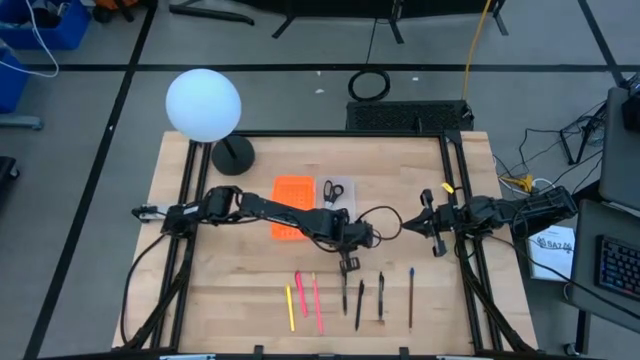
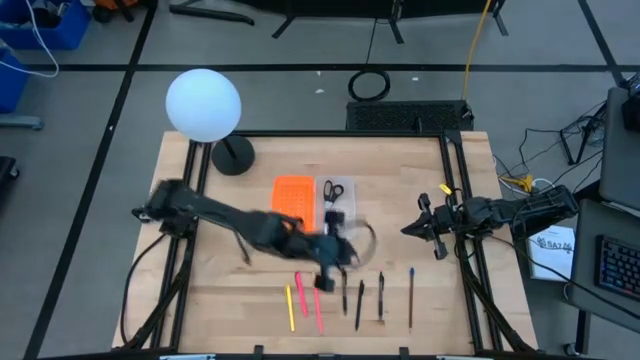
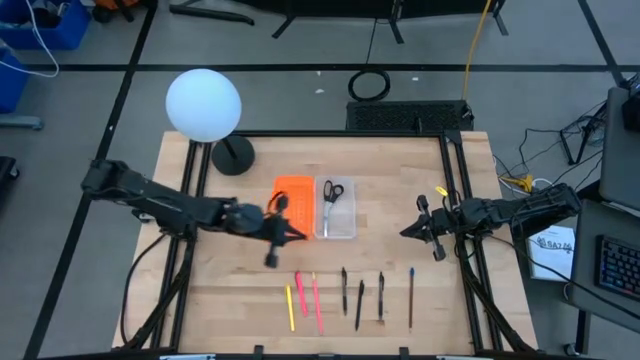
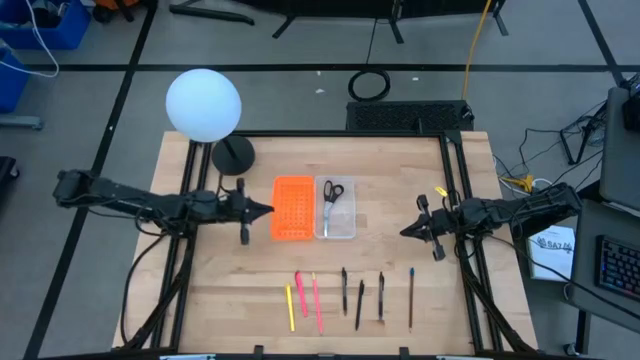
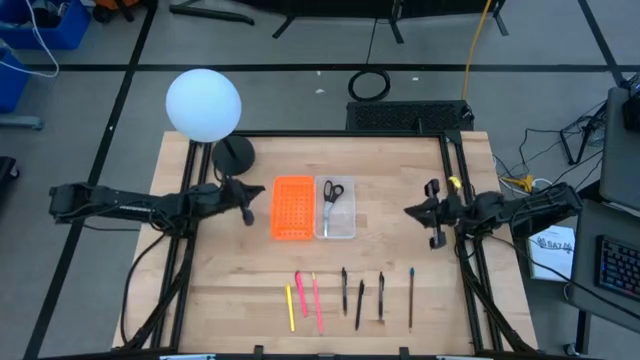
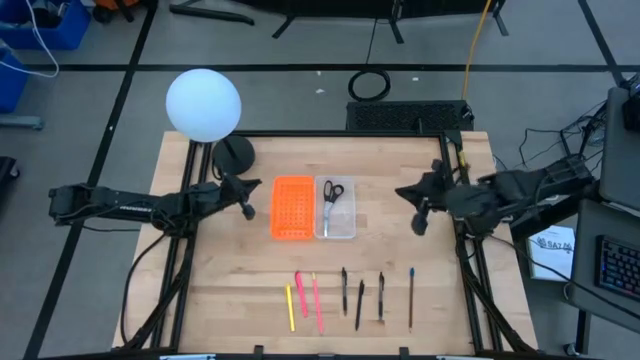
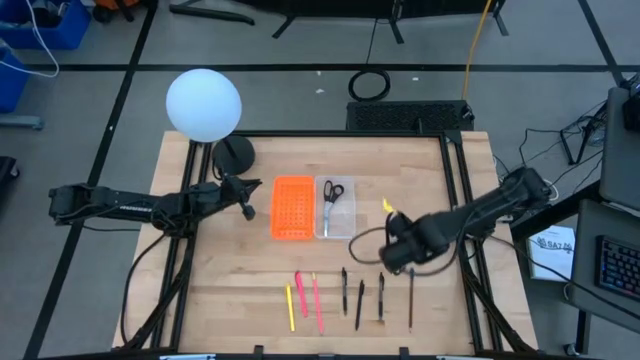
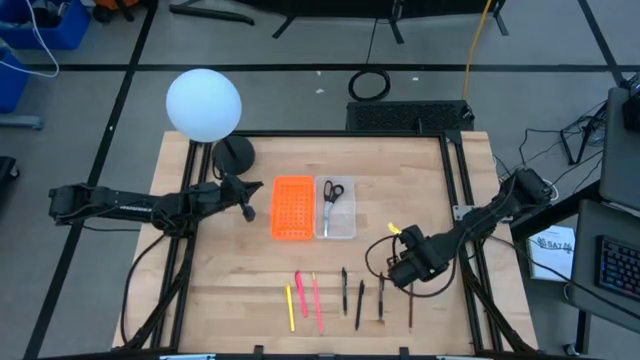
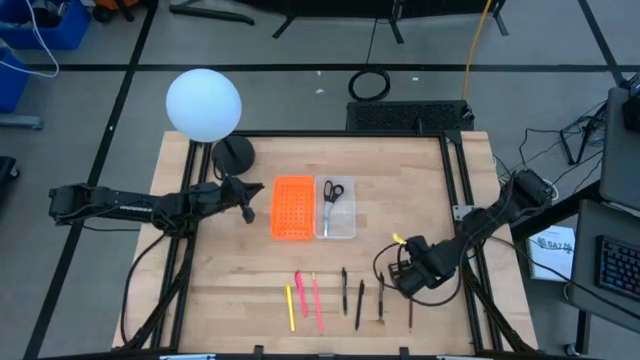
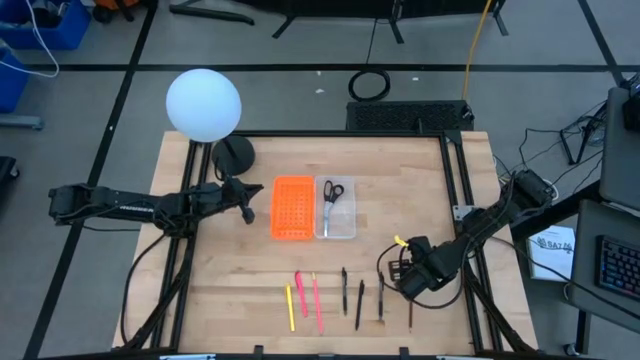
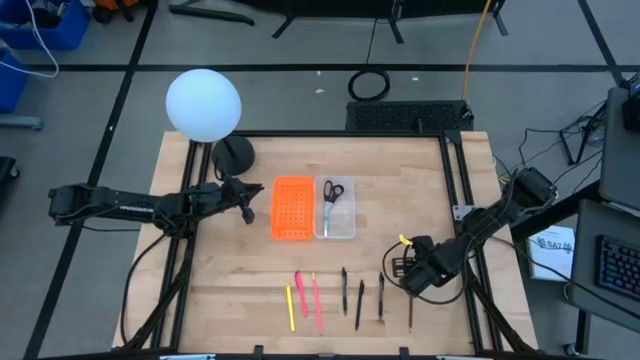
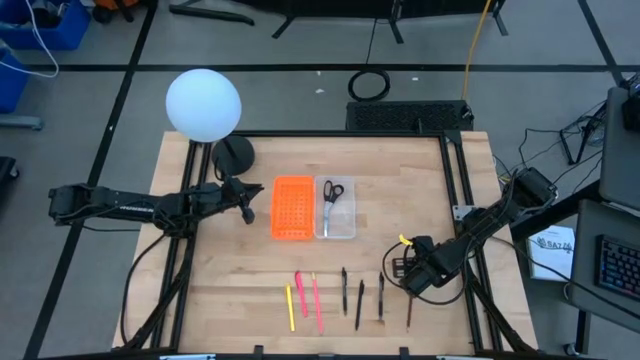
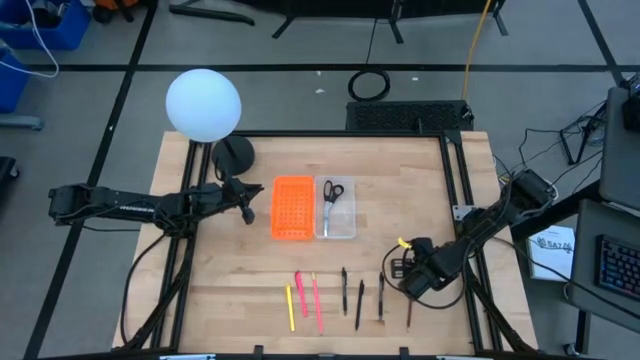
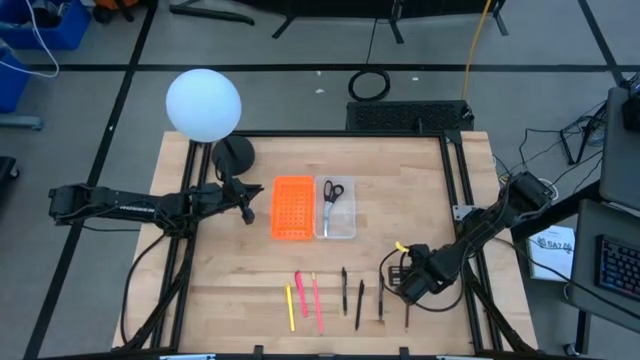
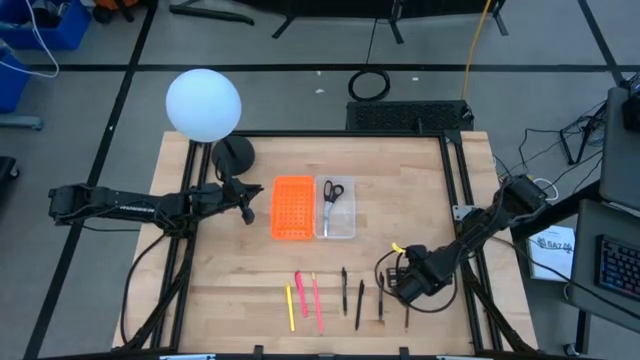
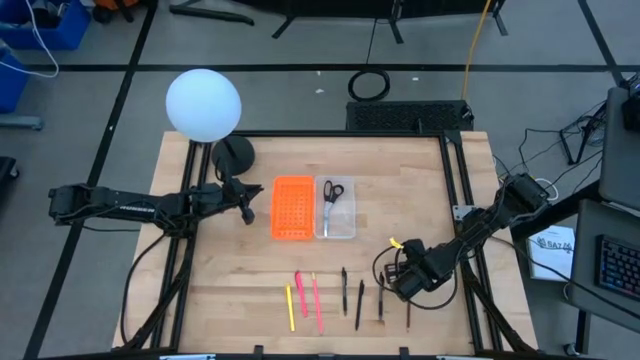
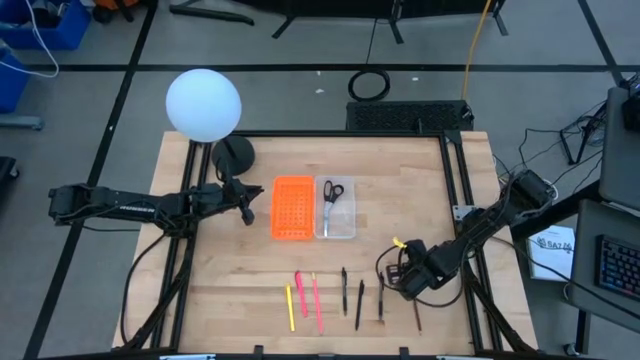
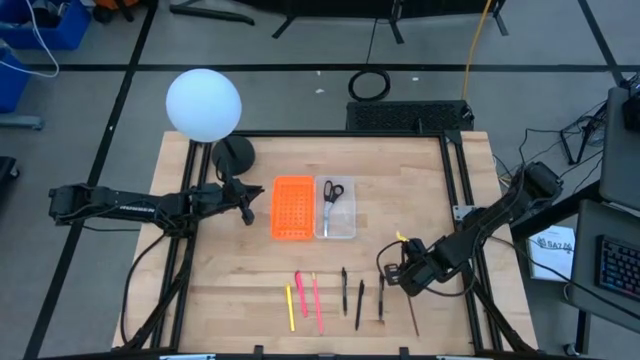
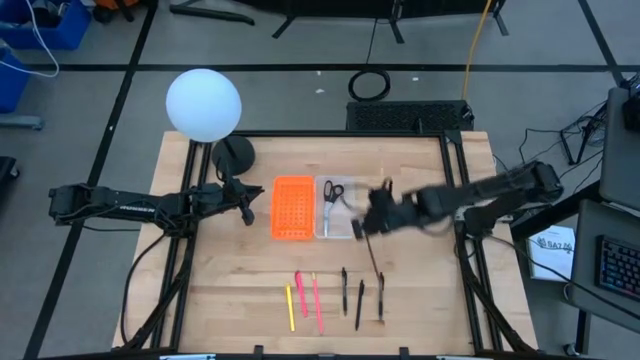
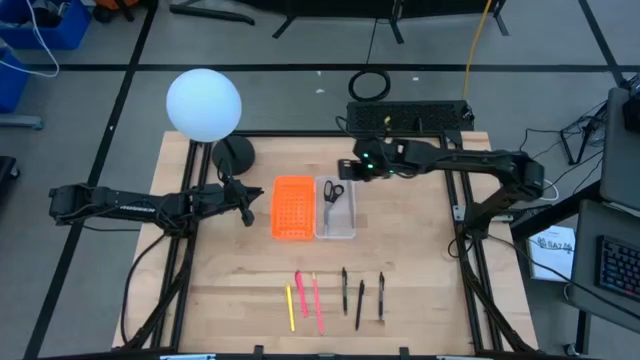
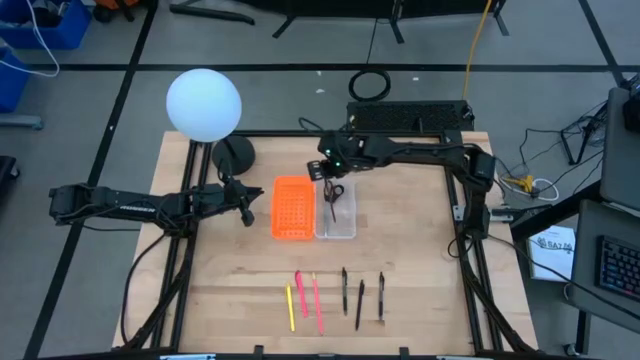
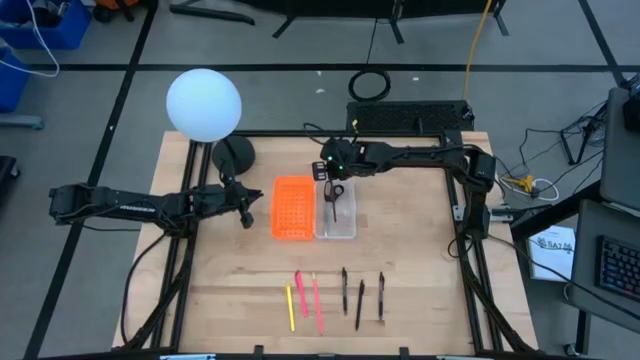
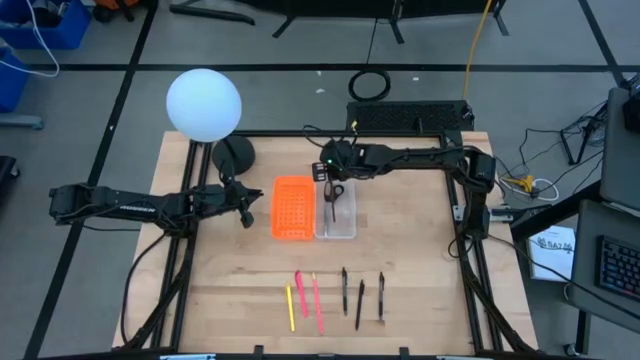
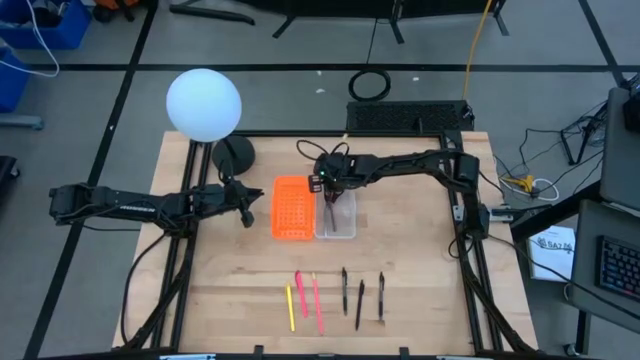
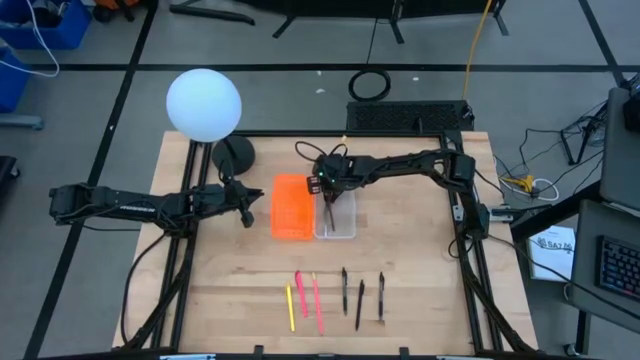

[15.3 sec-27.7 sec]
Task: Pick & place school supplies into a supply box
Put the brown pencil into the orange supply box

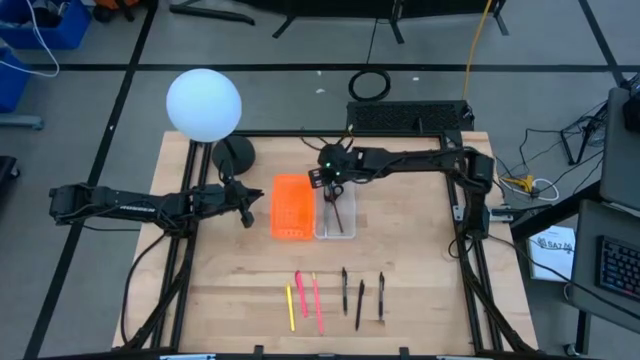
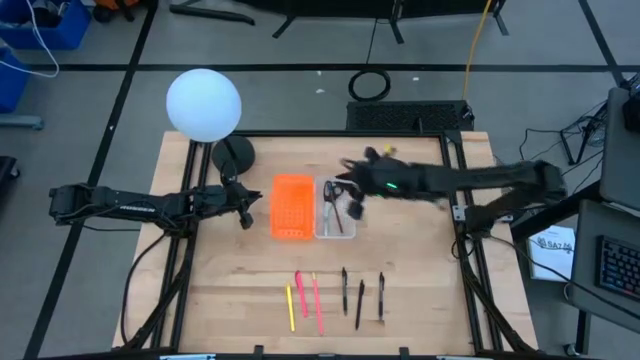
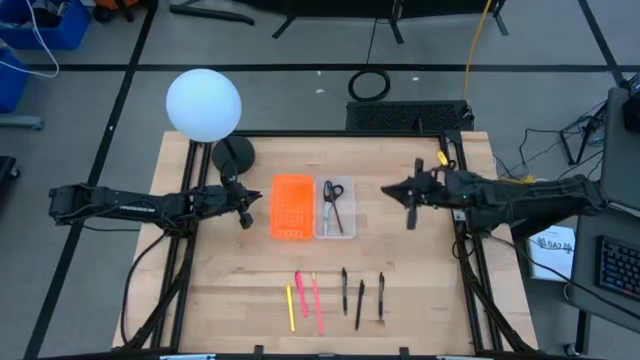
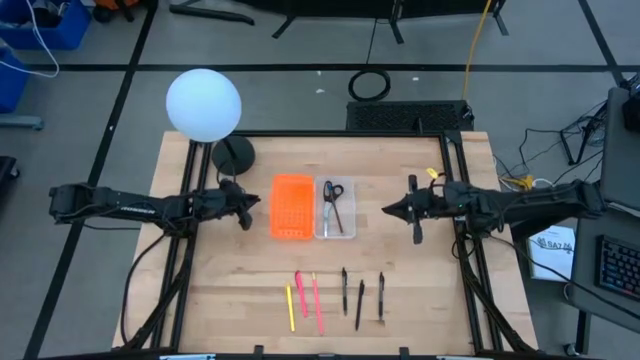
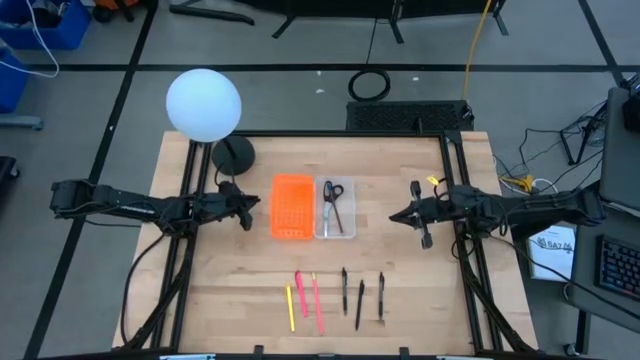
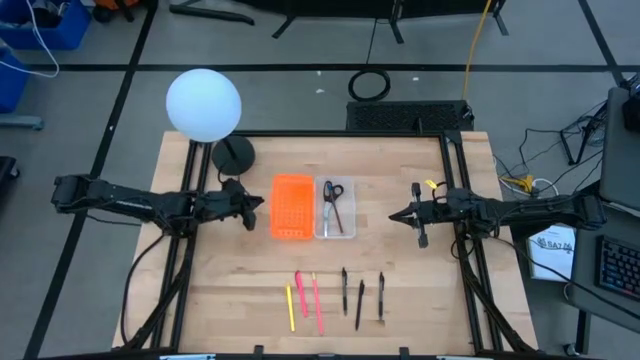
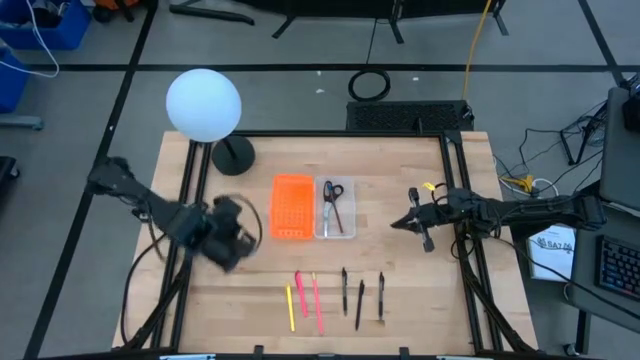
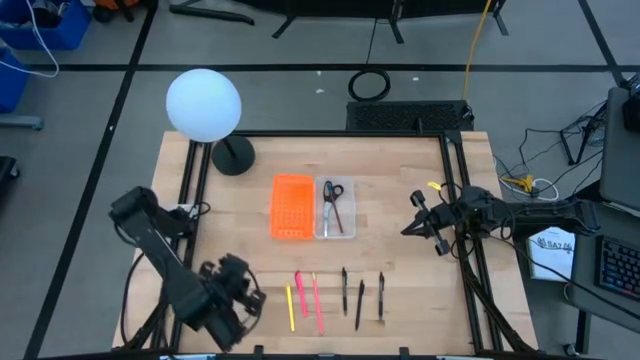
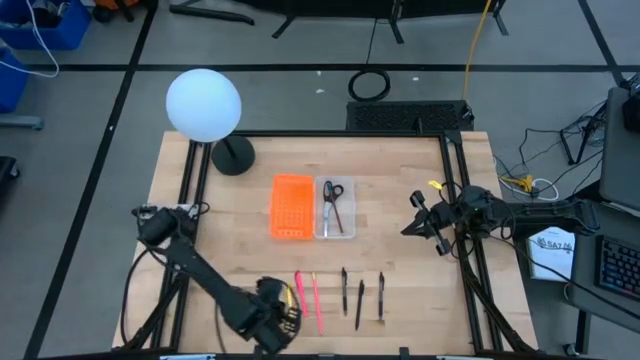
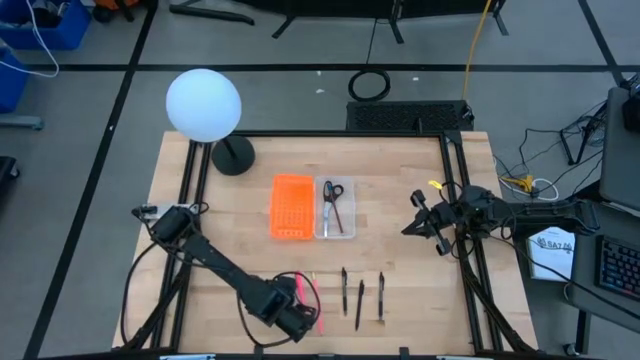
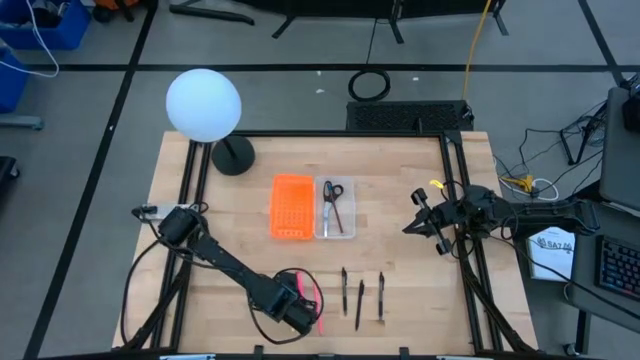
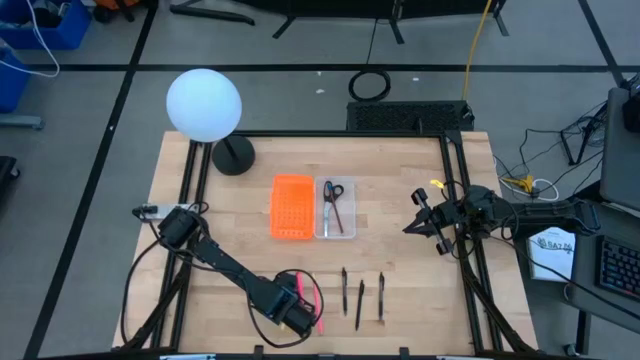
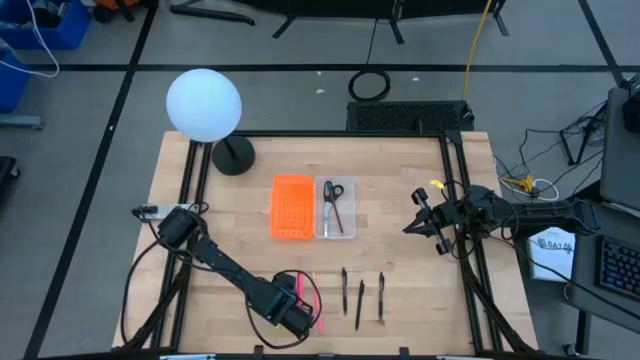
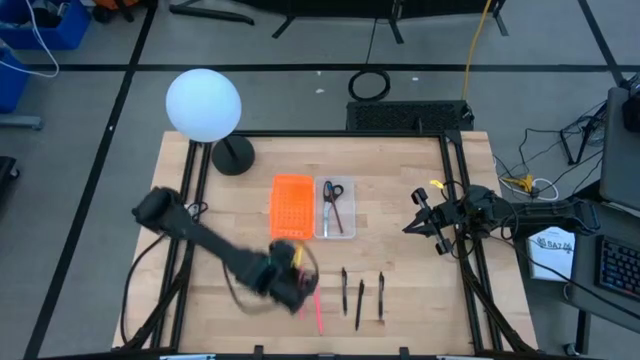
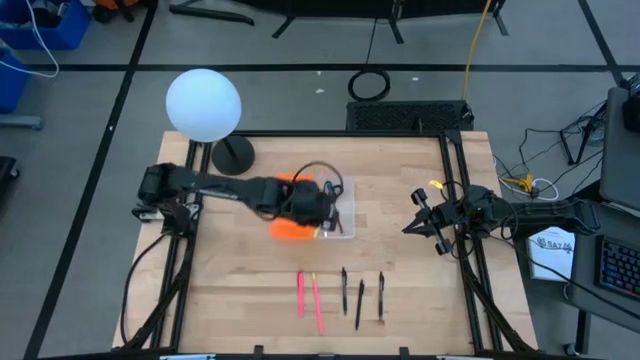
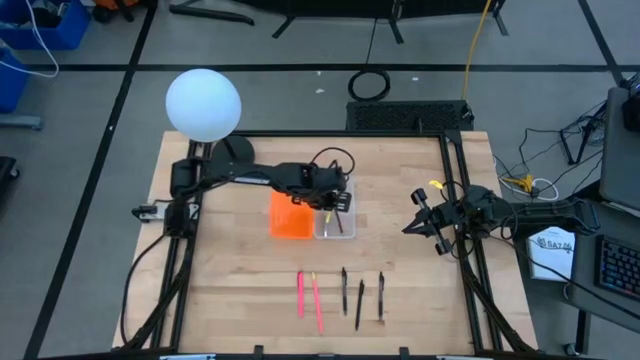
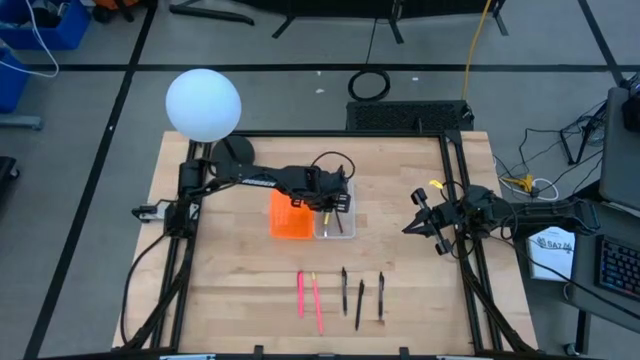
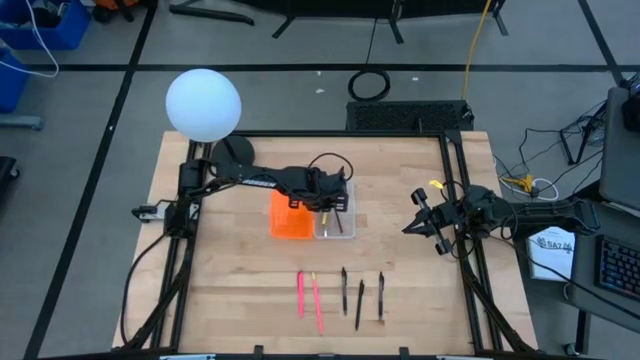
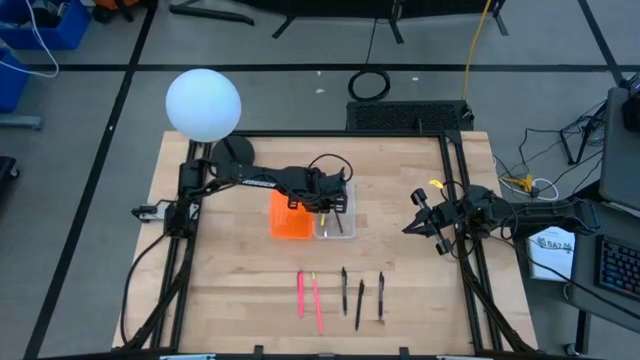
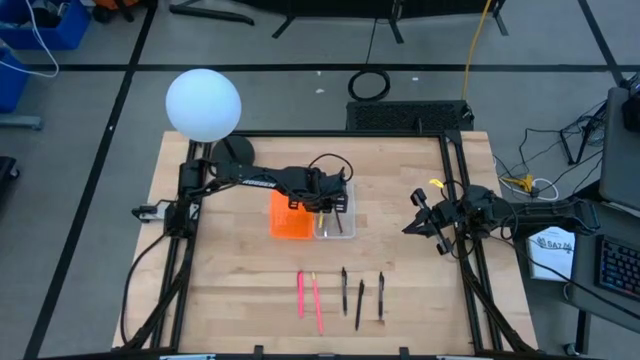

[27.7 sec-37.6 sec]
Put the yellow pen into the orange supply box
